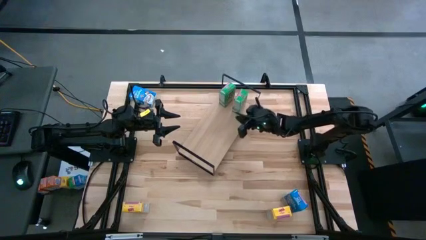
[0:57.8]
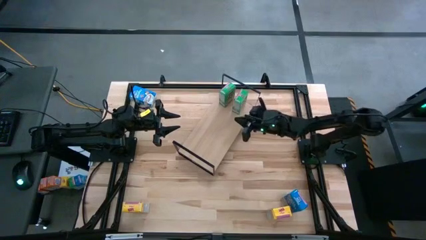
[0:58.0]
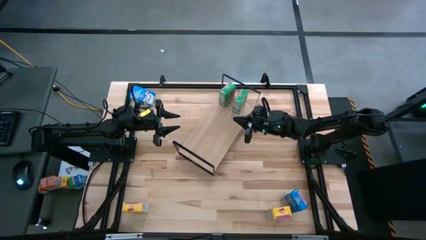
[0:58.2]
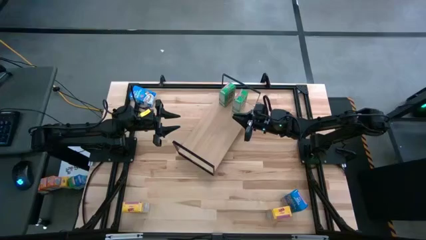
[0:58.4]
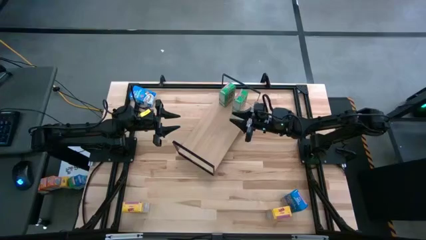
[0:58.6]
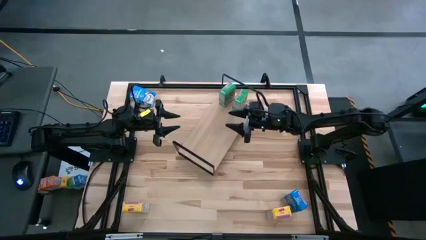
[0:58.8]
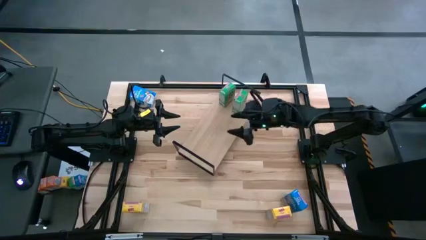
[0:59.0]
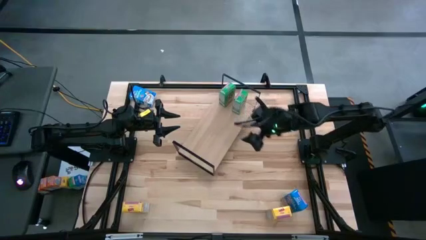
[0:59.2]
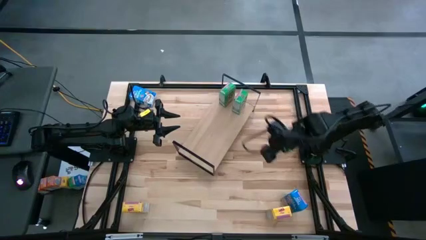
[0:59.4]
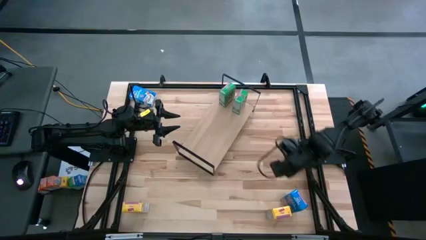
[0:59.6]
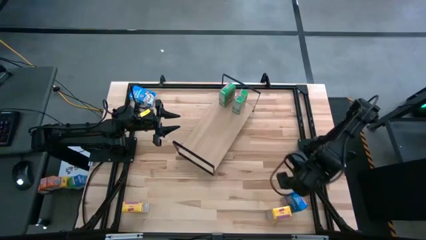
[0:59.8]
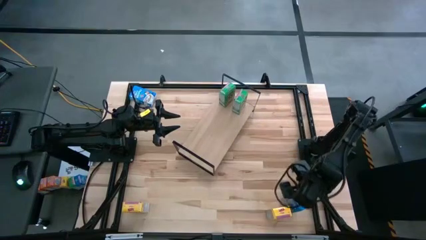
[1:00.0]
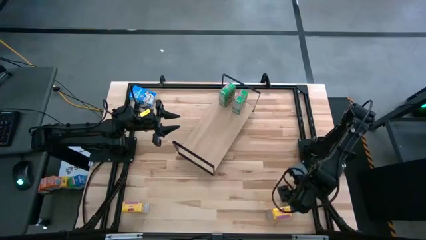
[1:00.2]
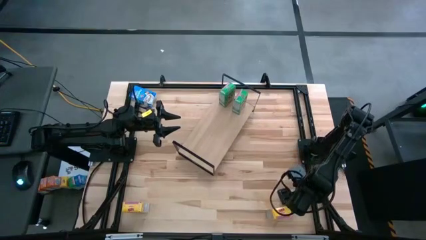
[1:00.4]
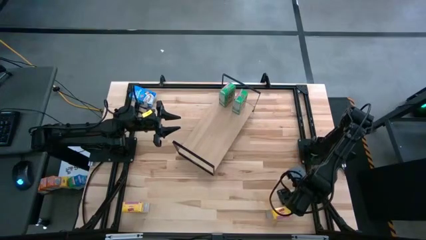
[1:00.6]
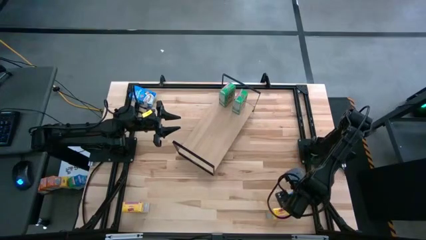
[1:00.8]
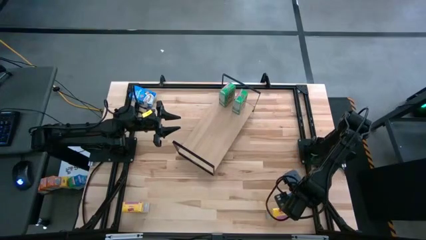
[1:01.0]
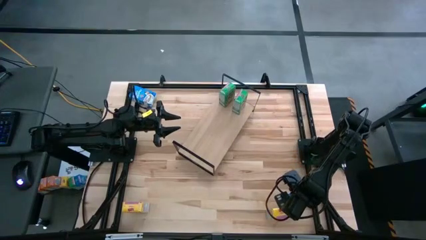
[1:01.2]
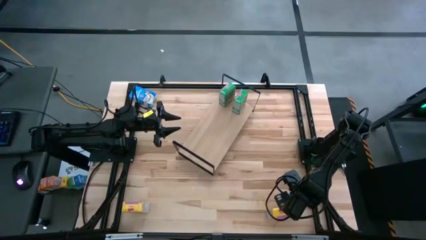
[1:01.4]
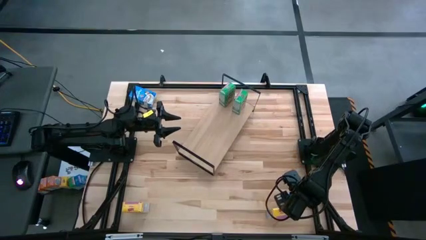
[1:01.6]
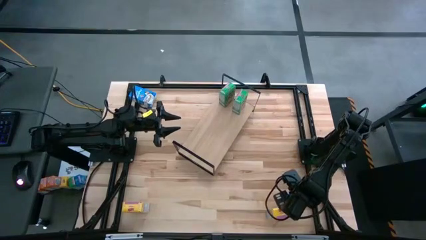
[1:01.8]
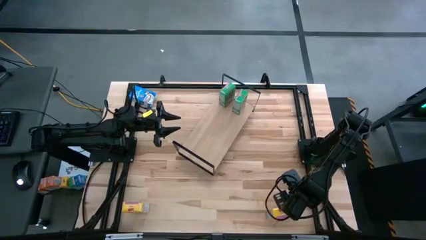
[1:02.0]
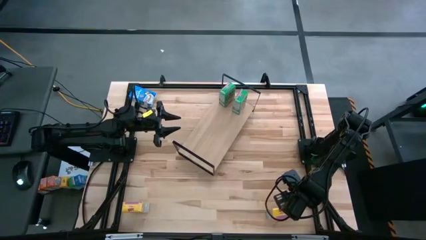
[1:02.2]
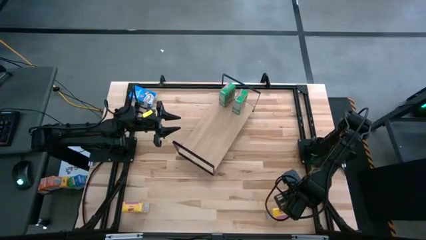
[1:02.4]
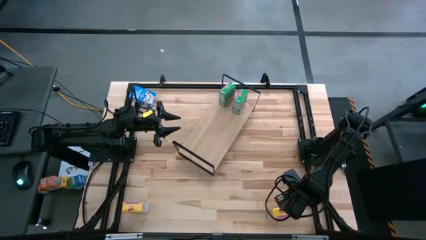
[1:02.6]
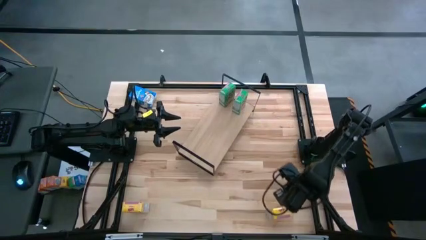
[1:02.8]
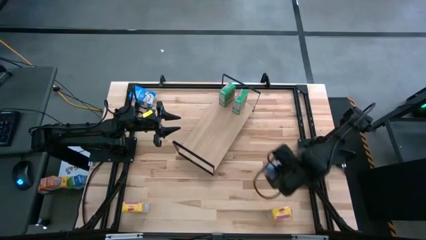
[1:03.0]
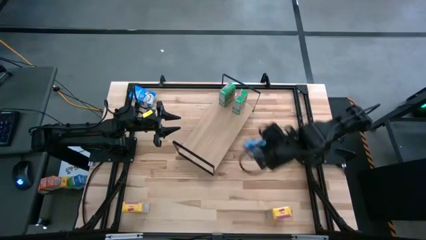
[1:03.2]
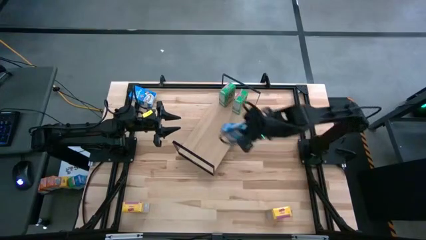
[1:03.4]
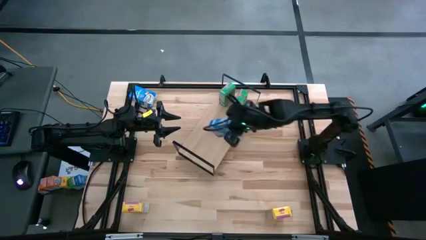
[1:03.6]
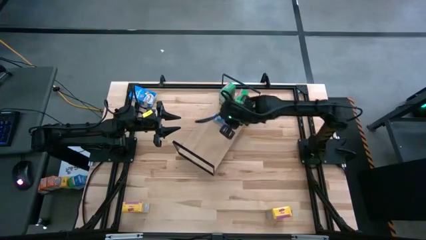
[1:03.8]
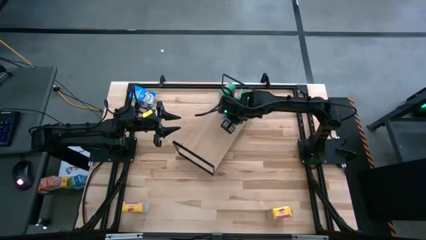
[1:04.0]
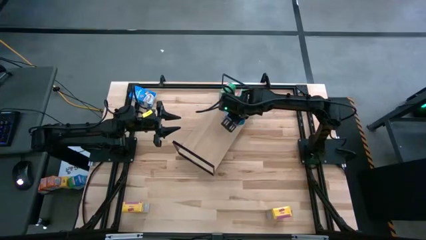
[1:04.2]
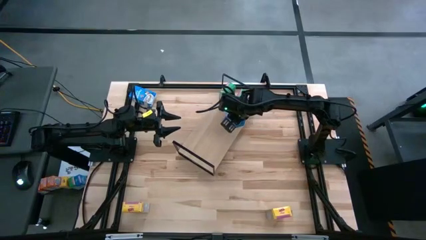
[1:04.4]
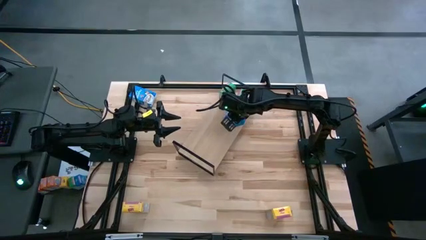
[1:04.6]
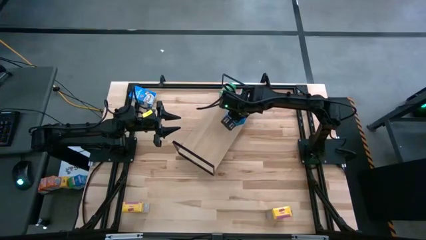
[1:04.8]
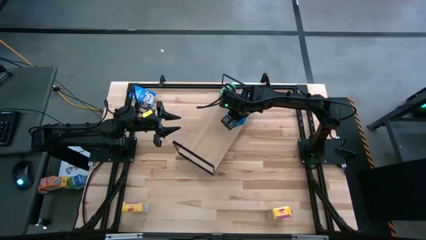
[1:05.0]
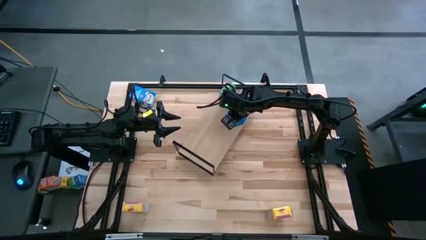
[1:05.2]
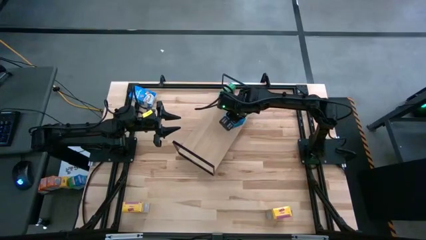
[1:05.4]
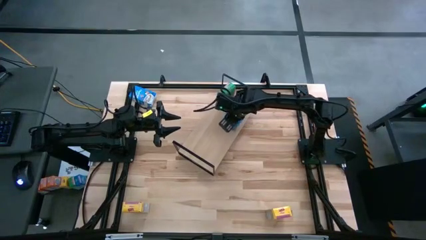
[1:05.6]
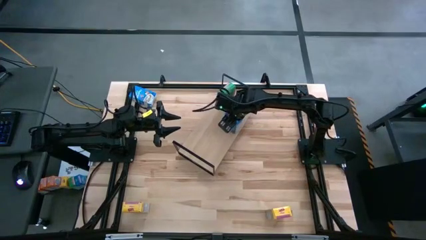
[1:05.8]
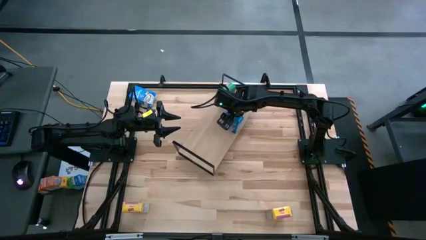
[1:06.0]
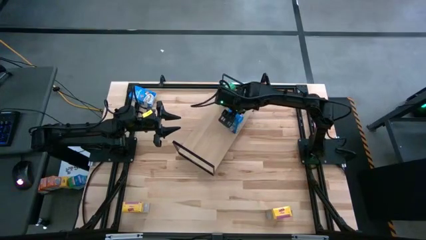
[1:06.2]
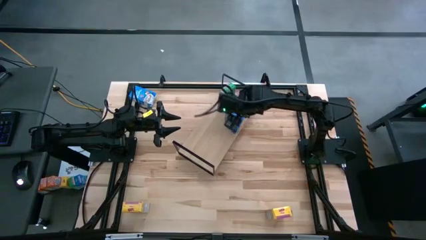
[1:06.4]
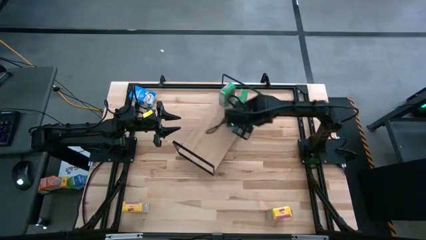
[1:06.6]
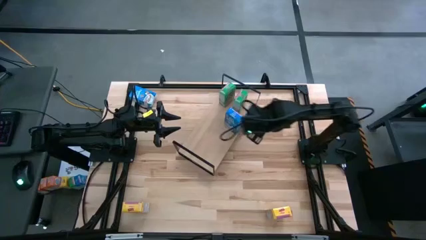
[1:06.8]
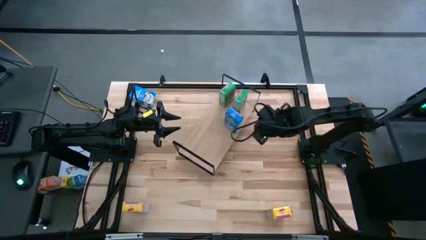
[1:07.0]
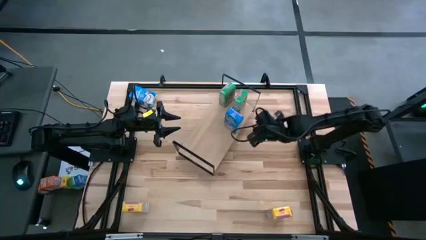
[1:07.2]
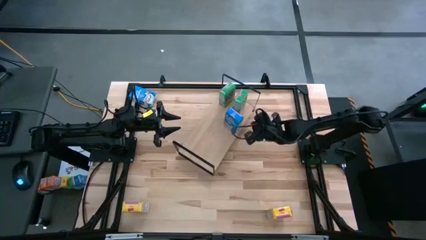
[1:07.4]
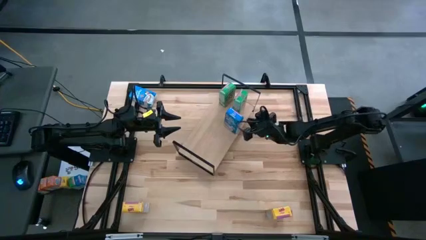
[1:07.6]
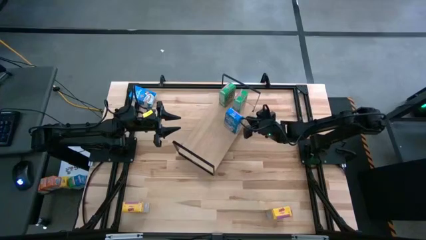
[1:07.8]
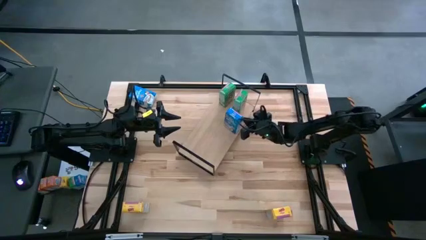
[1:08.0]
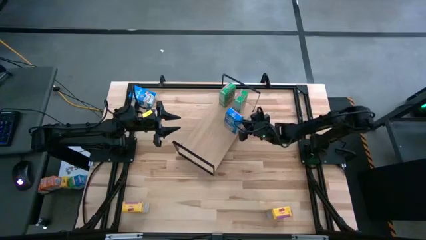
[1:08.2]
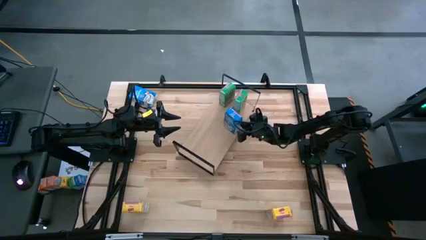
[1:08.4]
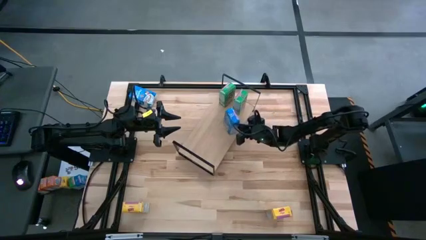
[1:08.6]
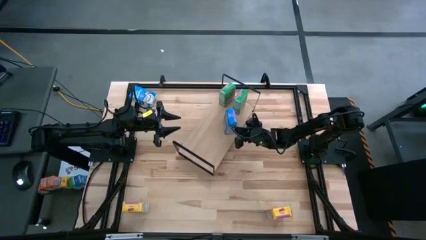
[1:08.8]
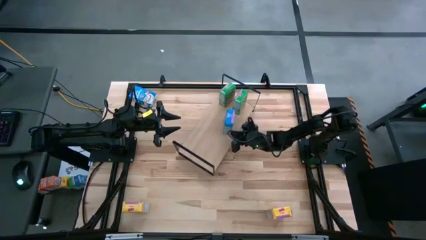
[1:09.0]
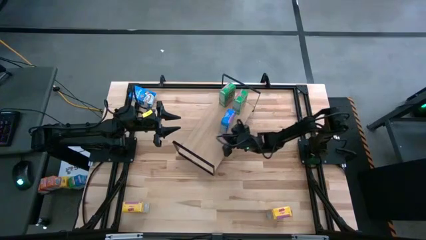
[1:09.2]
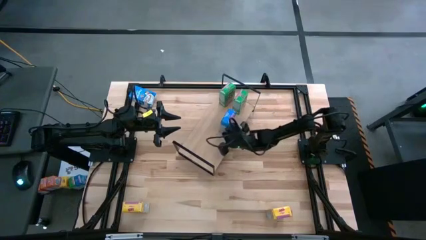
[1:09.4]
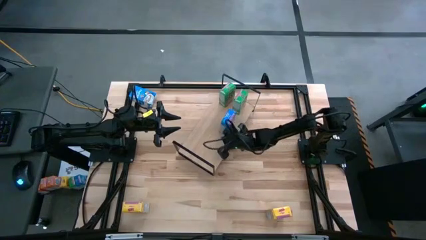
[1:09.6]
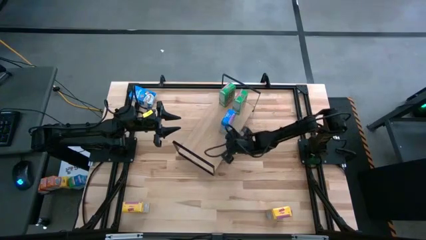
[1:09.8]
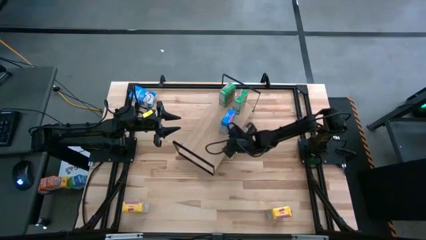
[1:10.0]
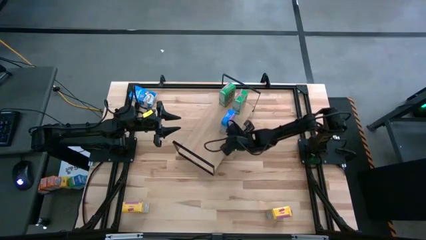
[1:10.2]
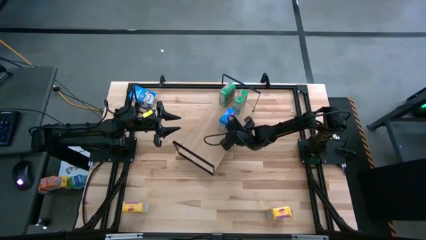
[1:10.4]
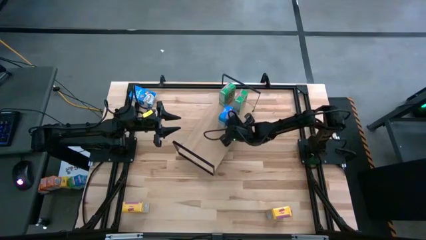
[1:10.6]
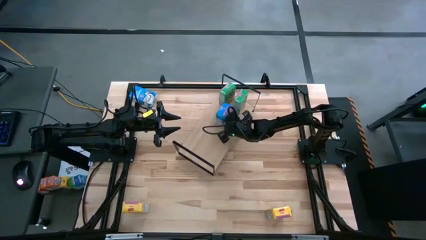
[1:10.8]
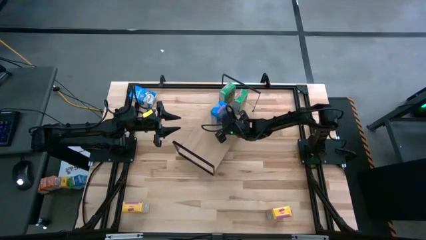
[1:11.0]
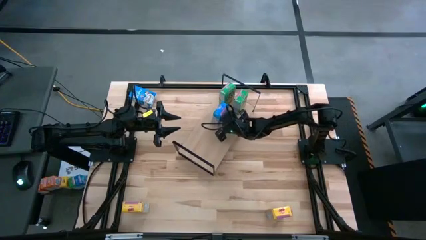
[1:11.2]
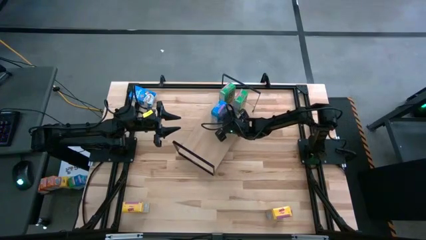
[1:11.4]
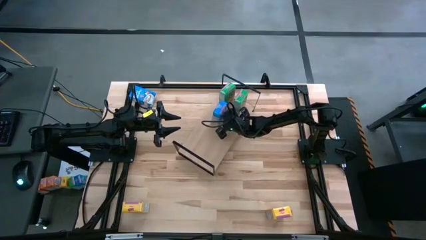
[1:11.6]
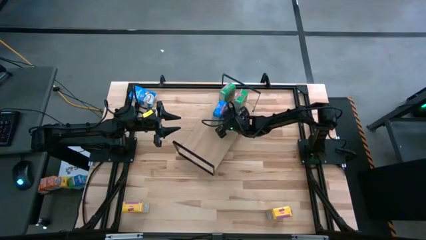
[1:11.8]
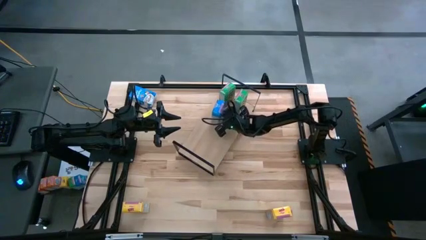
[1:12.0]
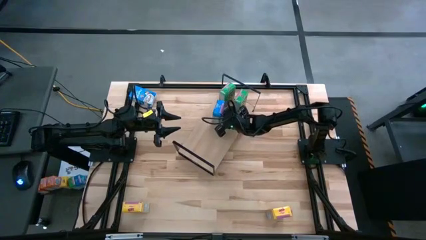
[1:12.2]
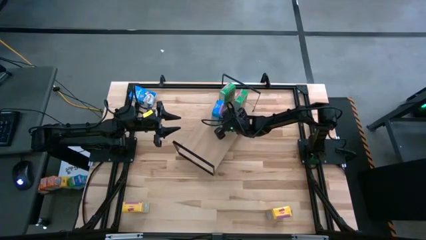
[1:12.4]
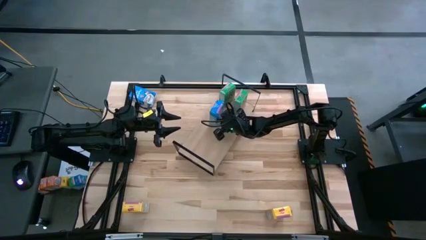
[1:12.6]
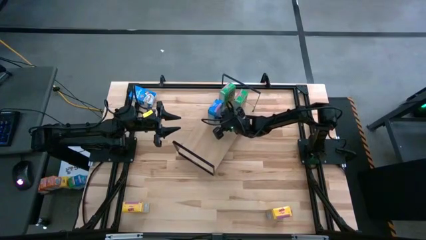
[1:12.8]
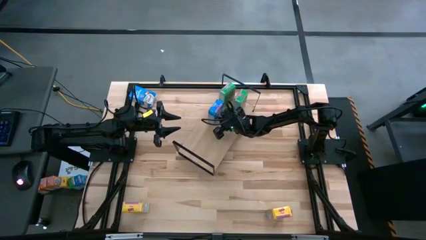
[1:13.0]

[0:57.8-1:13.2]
Task: Stack cereal on shelf
Put the bottom blue cereal box on the shelf
